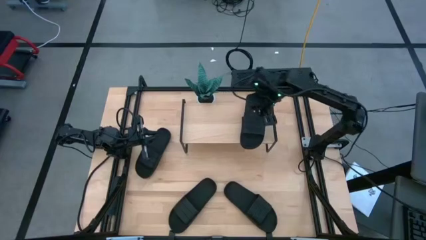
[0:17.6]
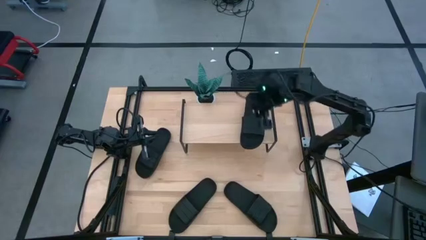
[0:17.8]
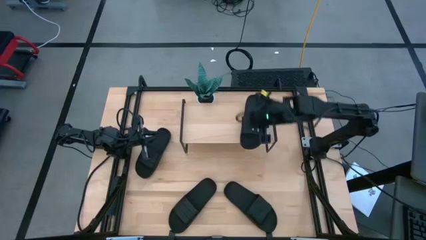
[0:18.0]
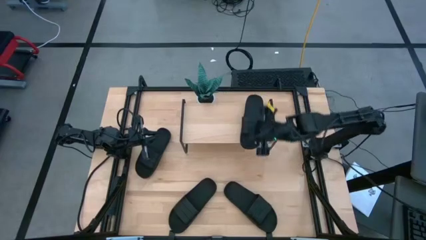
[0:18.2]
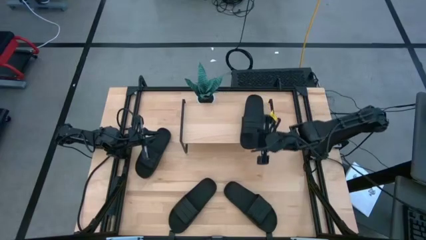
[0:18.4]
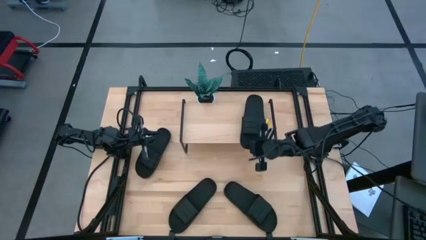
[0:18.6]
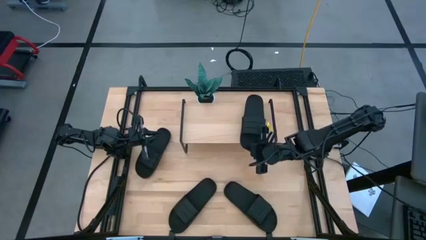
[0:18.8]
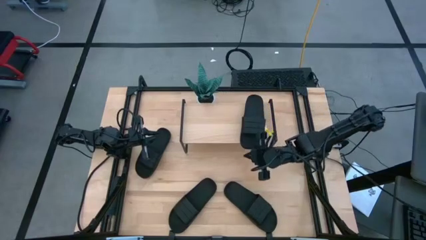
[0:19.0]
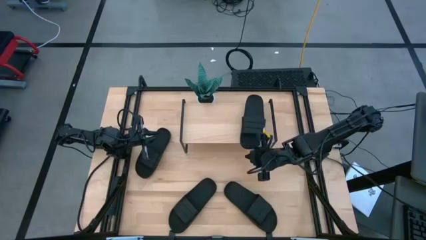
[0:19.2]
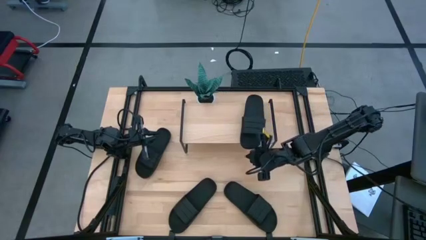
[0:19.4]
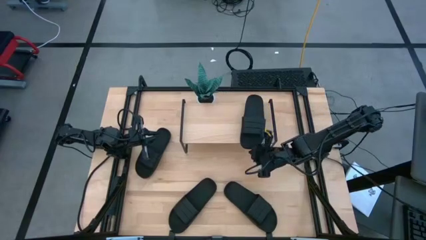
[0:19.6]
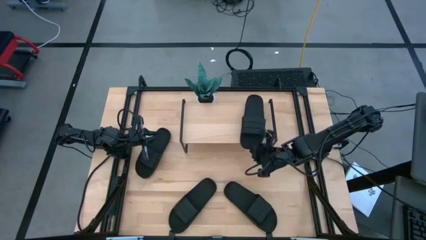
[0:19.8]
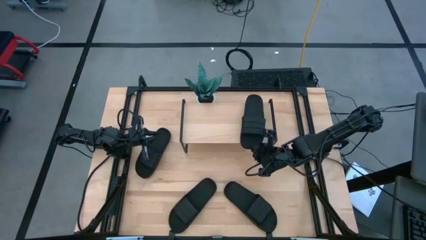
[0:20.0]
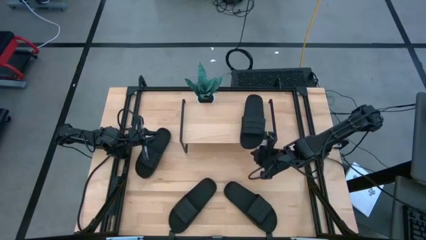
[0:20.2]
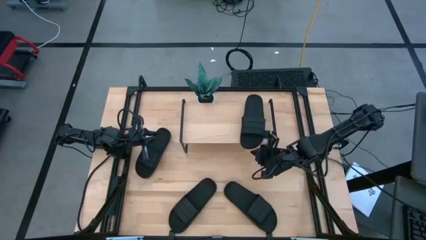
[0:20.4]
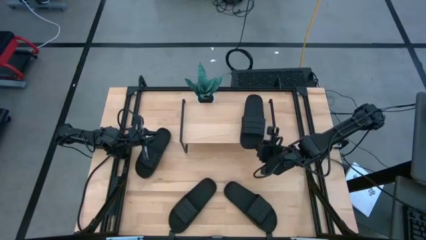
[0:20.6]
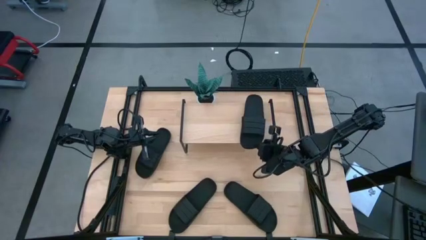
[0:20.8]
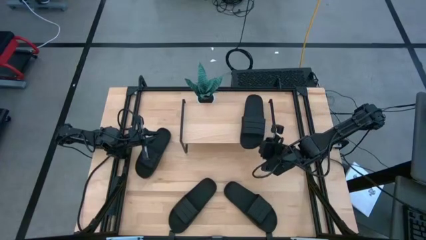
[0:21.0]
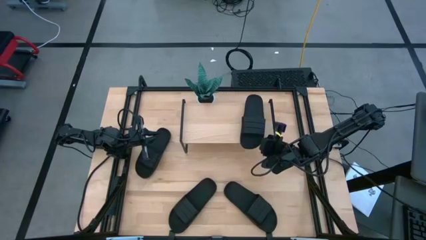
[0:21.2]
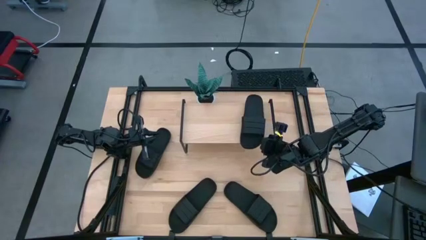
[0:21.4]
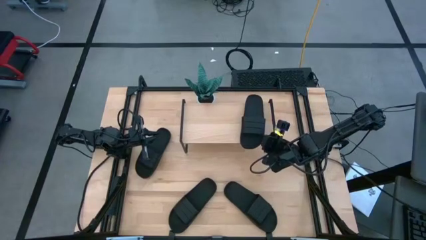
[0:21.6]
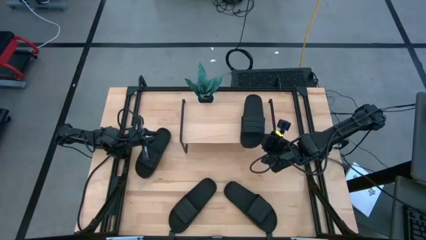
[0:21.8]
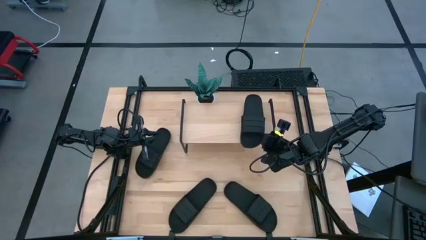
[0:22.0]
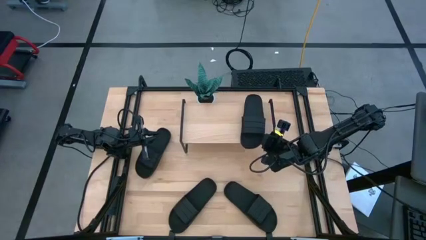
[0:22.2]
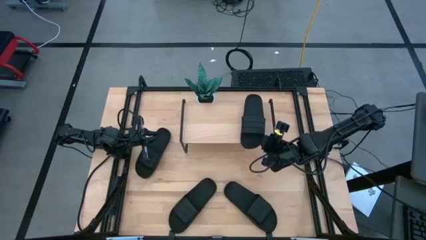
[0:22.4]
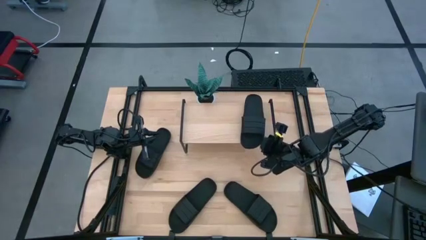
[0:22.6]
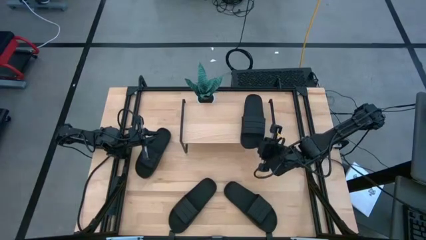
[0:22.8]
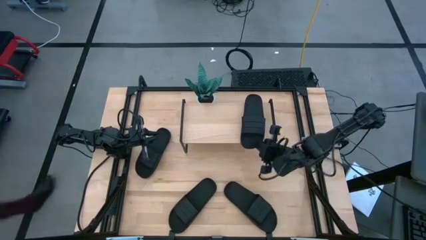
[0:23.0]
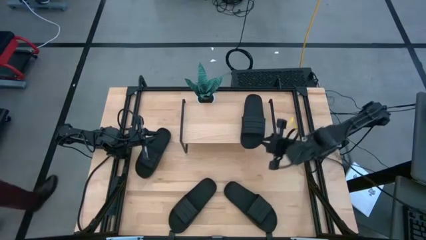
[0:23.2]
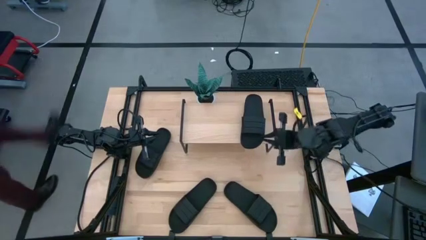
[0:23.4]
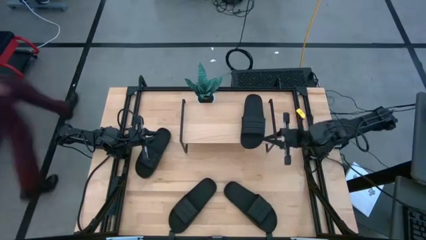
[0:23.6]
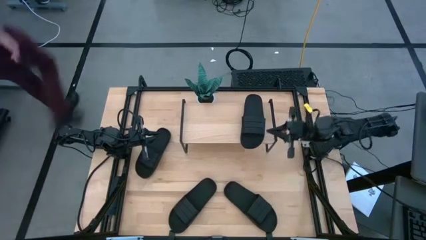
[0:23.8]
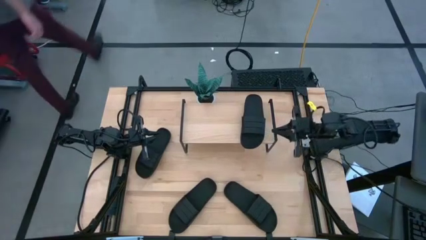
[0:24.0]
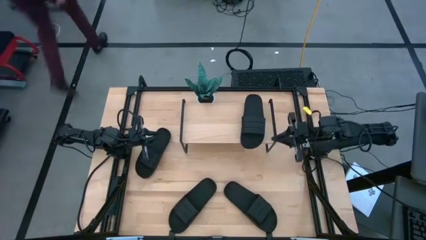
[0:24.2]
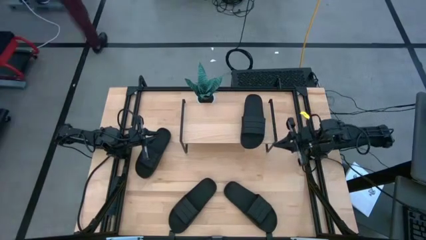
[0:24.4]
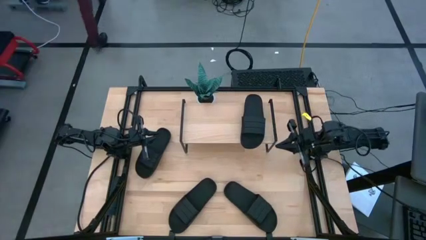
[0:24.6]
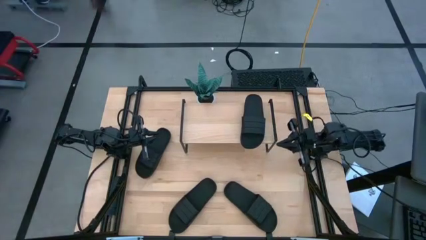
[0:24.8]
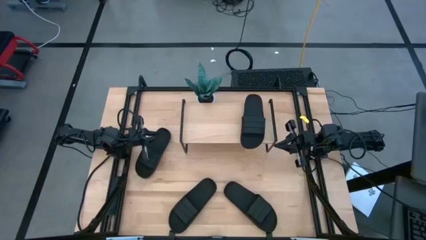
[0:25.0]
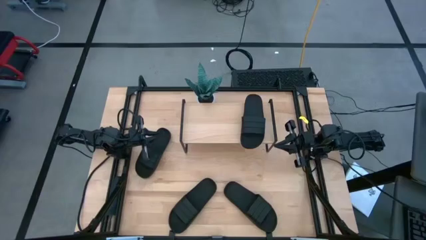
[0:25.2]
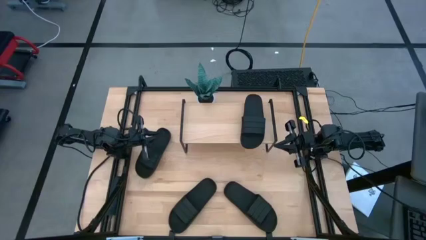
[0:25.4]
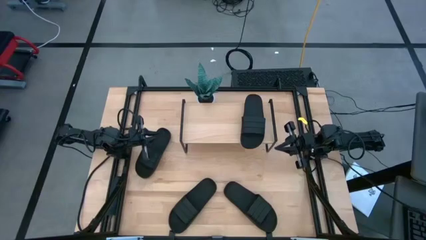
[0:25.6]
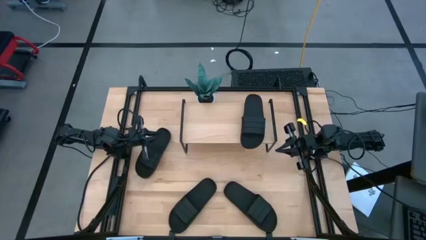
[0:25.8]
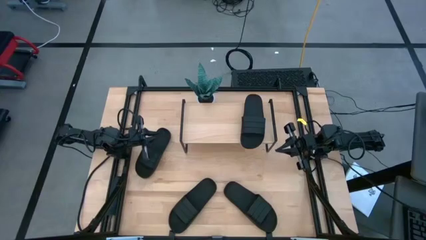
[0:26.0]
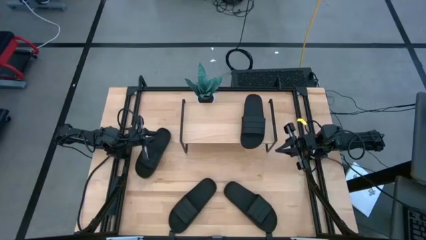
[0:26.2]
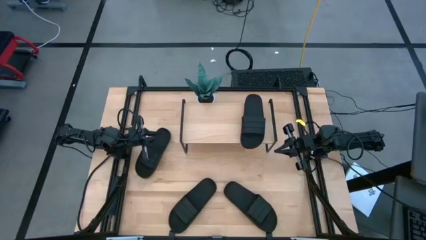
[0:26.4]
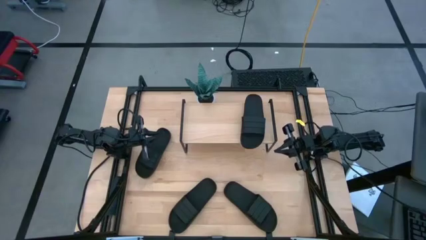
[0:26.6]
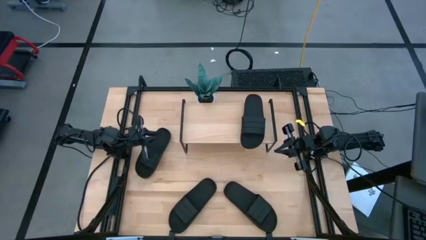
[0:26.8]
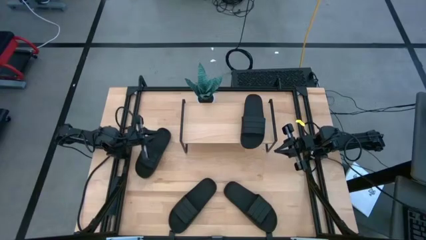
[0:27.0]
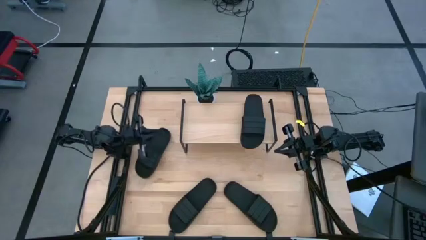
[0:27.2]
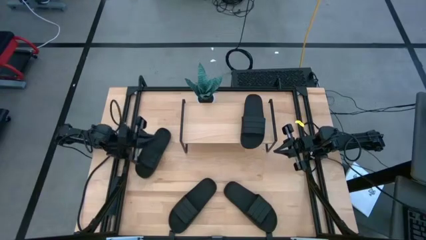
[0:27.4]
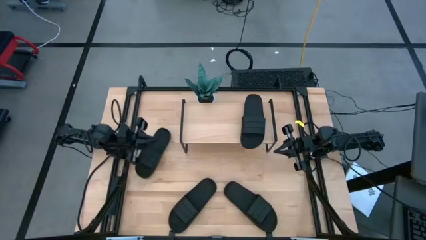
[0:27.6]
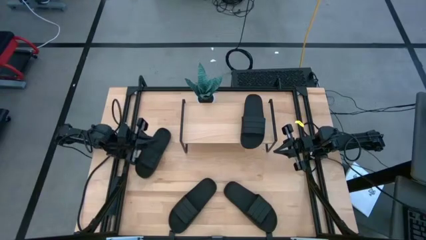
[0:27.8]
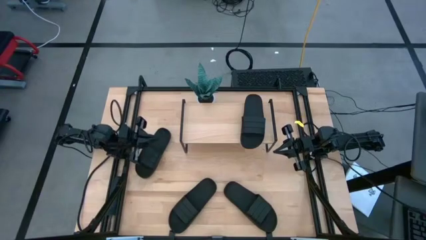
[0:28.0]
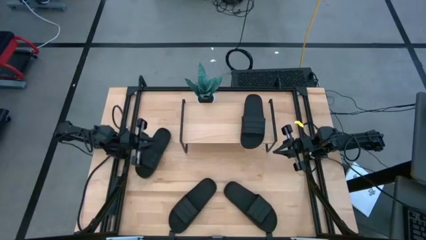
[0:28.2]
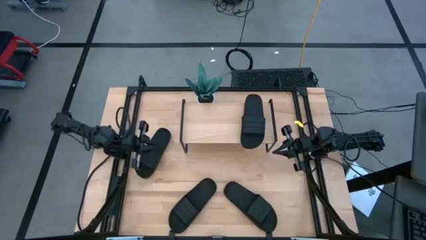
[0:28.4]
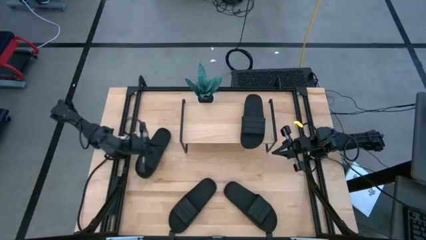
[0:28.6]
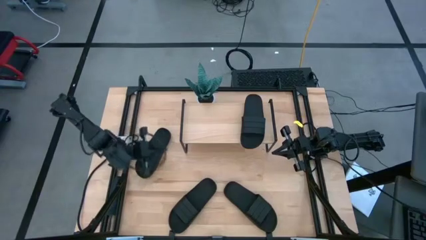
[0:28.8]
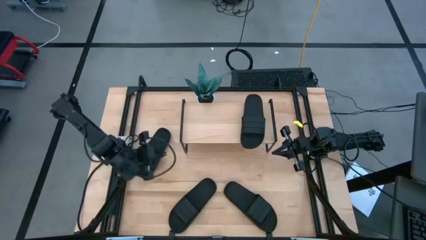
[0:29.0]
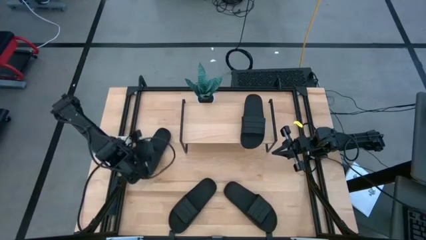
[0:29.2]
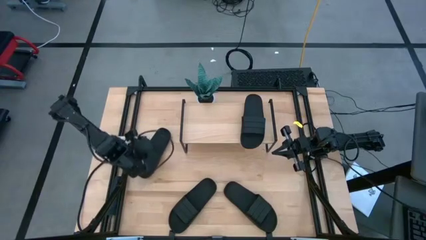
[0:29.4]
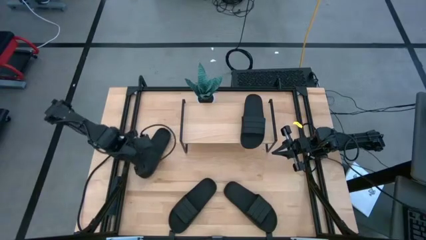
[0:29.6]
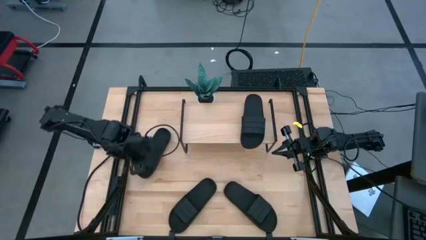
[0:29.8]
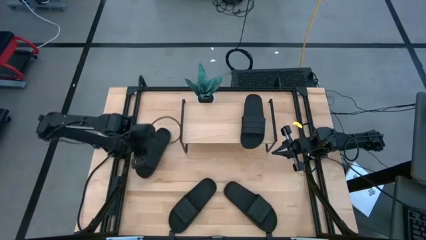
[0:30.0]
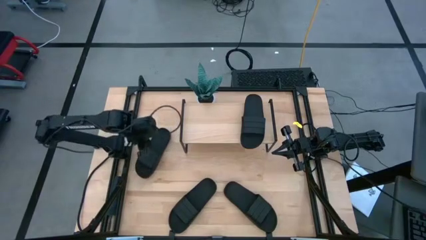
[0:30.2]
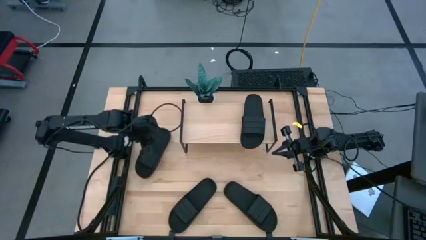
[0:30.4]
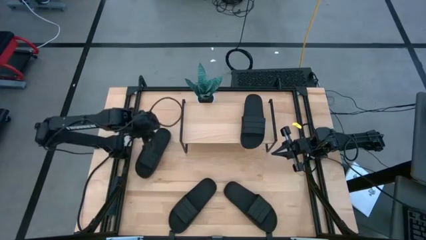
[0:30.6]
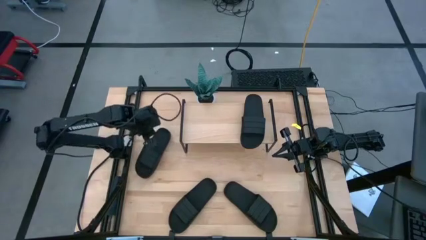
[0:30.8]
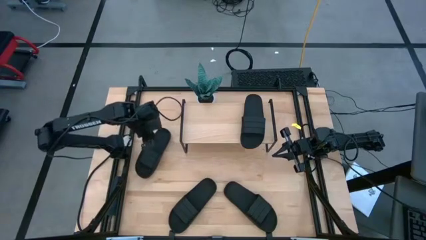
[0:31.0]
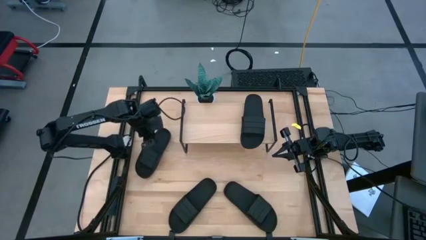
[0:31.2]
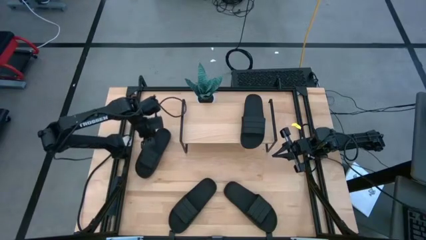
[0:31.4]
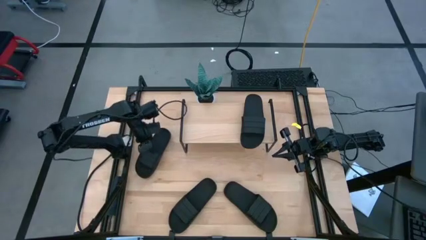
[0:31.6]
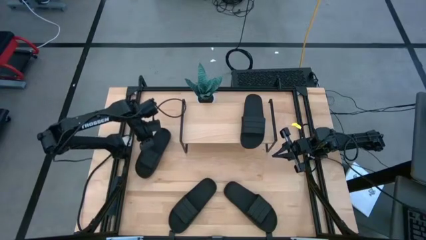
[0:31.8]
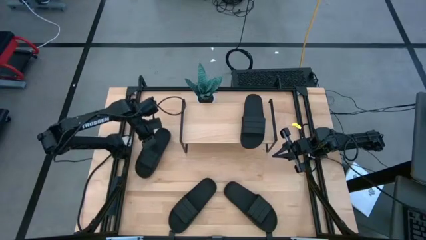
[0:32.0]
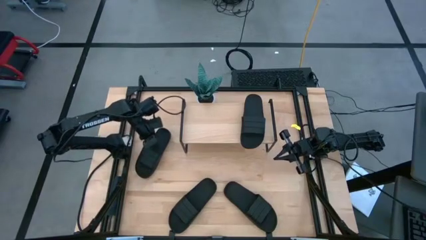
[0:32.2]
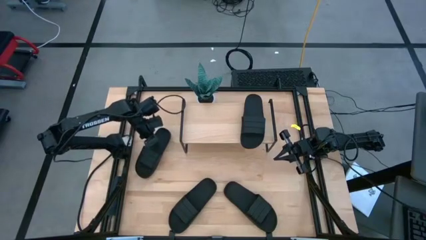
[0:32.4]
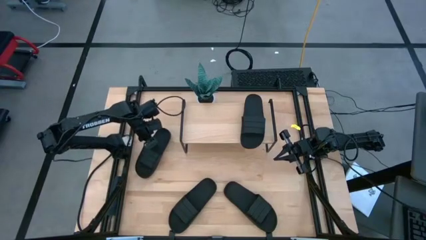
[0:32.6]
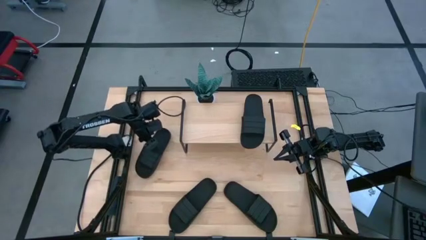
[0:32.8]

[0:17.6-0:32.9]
Task: Pick and place slides into the shelf
Put the top black slide on the shelf
